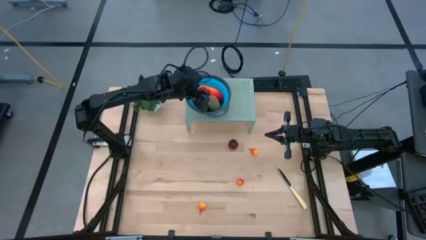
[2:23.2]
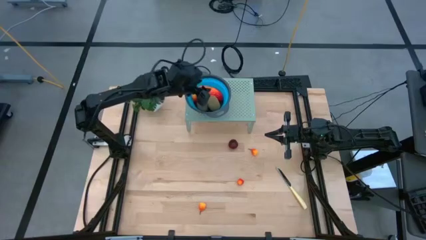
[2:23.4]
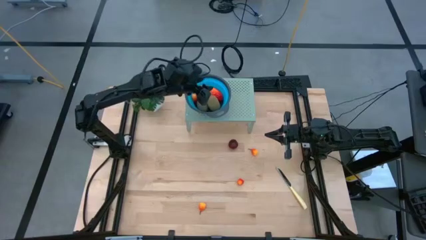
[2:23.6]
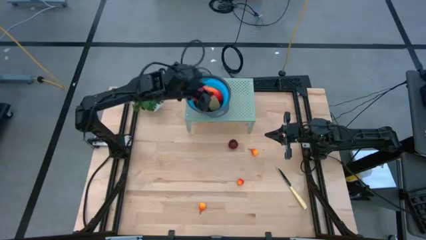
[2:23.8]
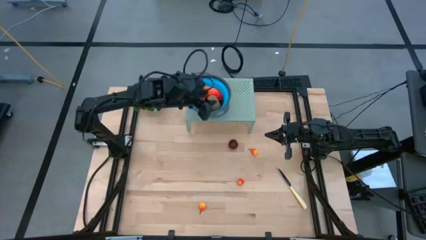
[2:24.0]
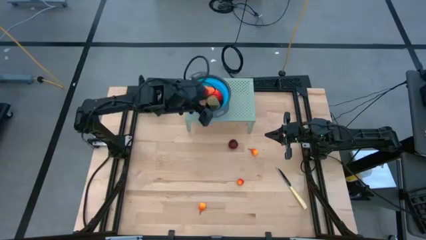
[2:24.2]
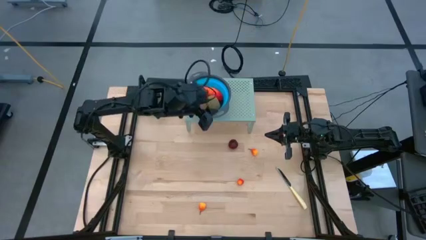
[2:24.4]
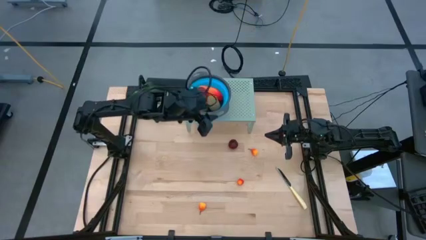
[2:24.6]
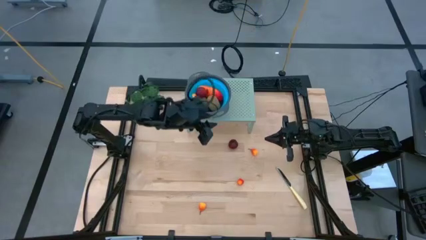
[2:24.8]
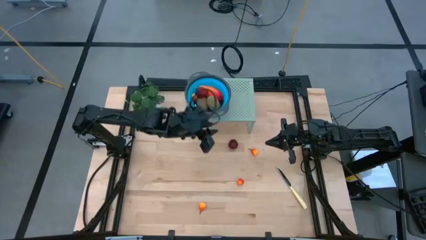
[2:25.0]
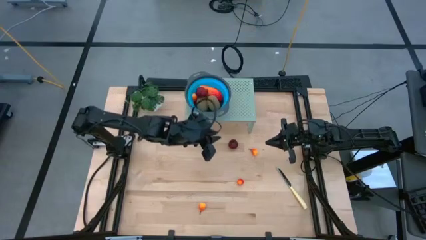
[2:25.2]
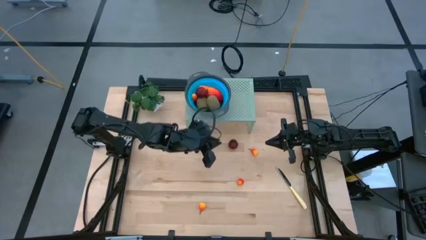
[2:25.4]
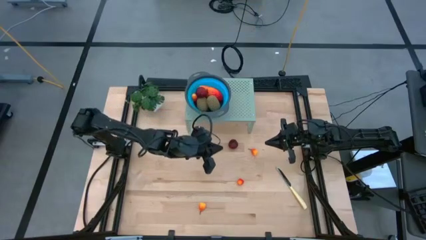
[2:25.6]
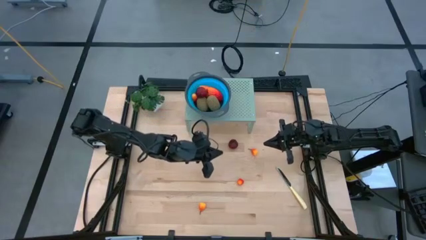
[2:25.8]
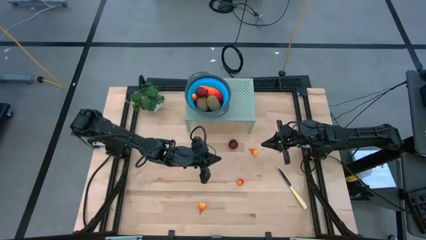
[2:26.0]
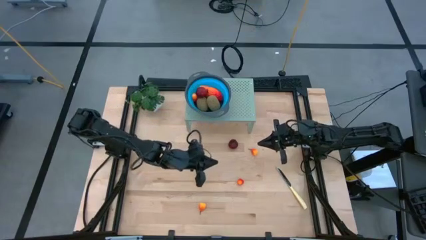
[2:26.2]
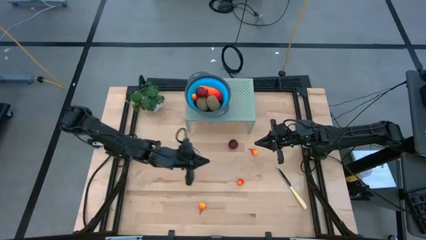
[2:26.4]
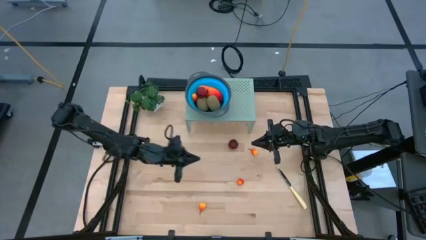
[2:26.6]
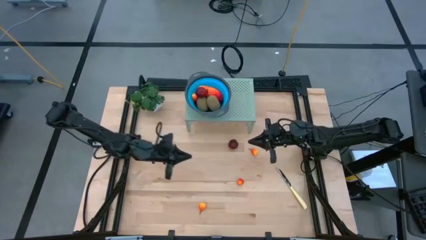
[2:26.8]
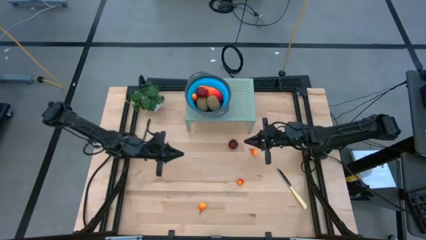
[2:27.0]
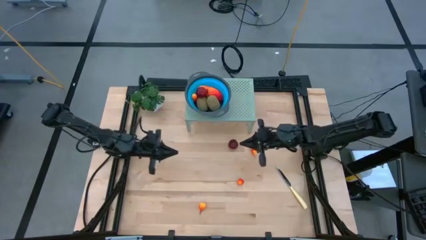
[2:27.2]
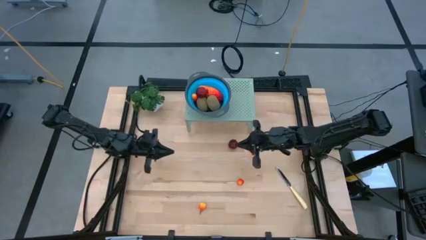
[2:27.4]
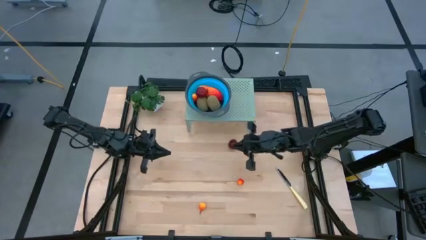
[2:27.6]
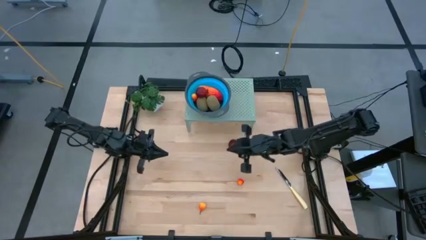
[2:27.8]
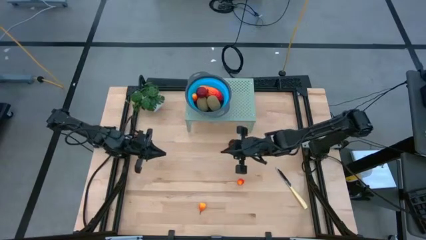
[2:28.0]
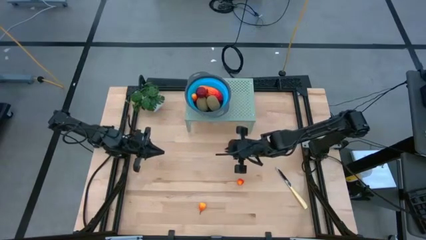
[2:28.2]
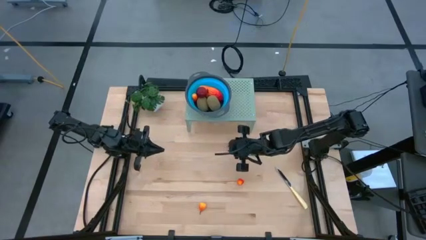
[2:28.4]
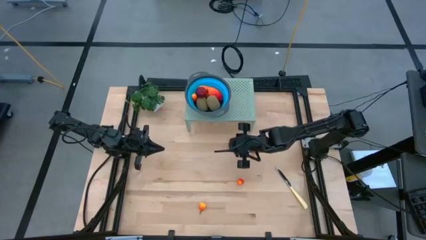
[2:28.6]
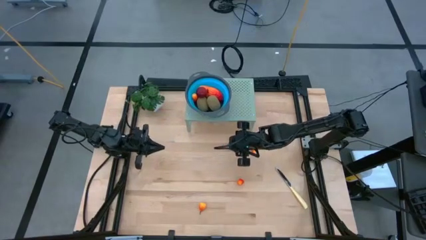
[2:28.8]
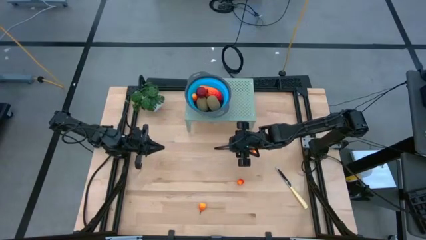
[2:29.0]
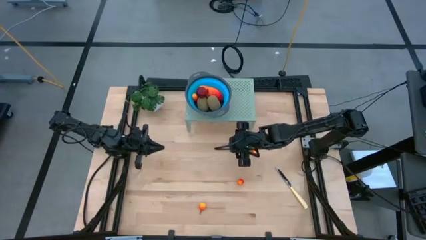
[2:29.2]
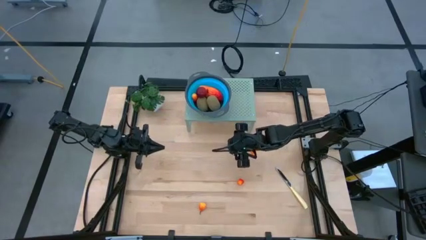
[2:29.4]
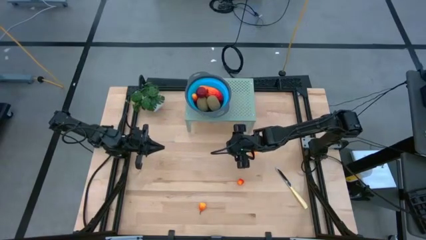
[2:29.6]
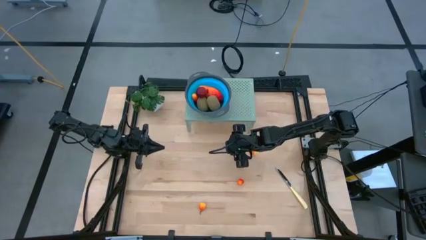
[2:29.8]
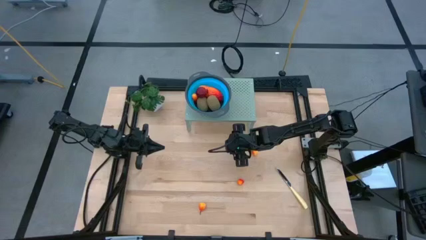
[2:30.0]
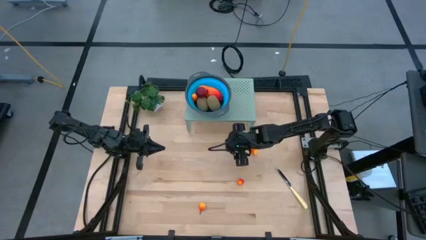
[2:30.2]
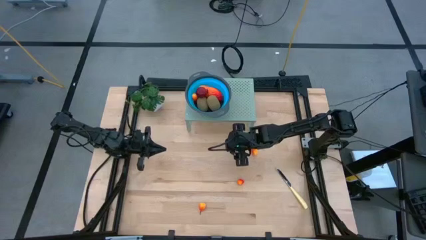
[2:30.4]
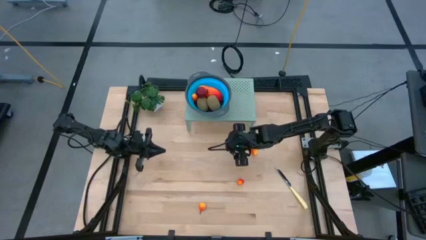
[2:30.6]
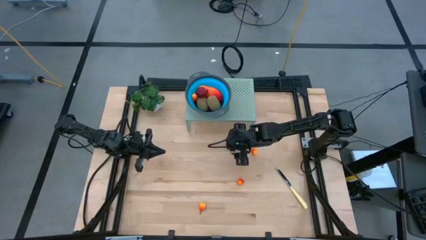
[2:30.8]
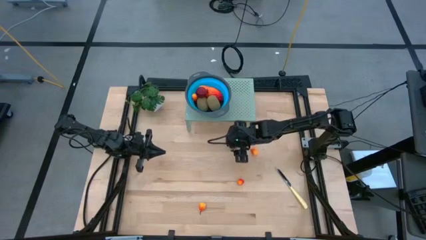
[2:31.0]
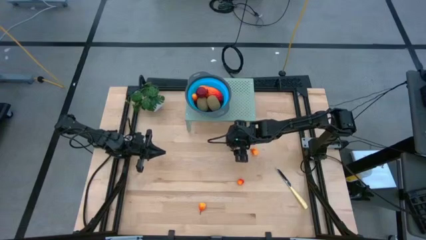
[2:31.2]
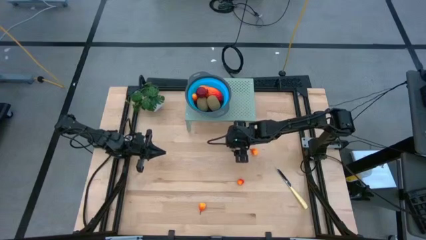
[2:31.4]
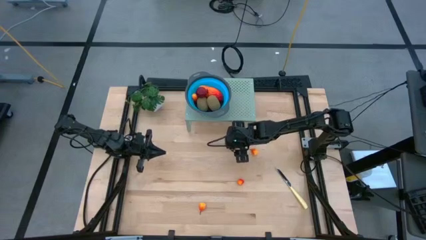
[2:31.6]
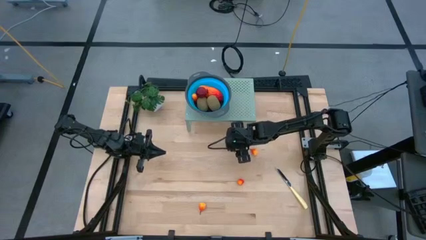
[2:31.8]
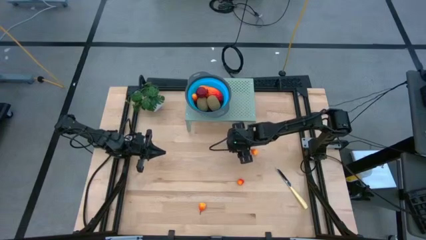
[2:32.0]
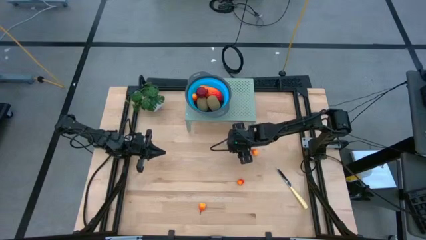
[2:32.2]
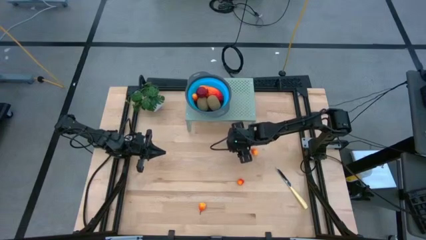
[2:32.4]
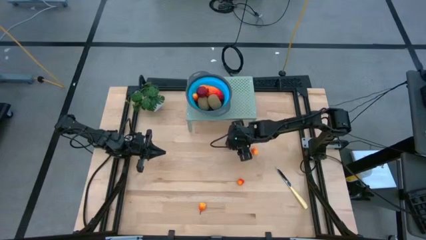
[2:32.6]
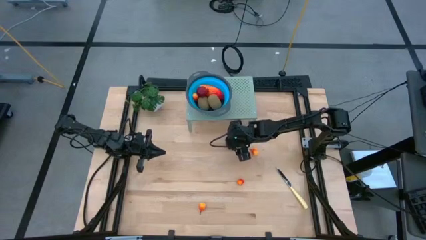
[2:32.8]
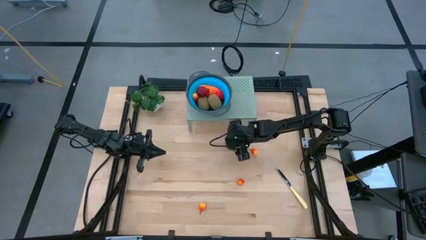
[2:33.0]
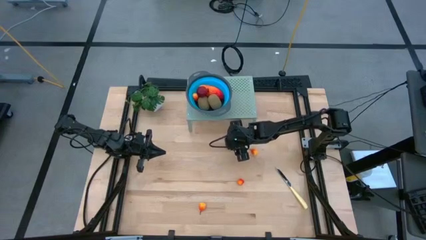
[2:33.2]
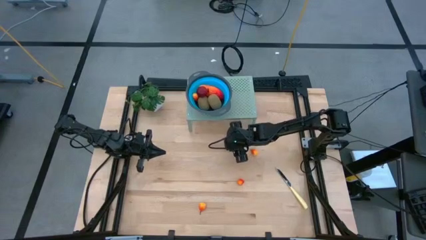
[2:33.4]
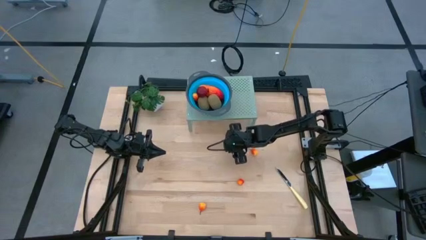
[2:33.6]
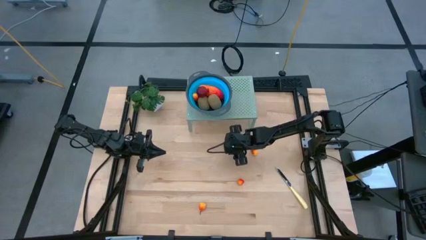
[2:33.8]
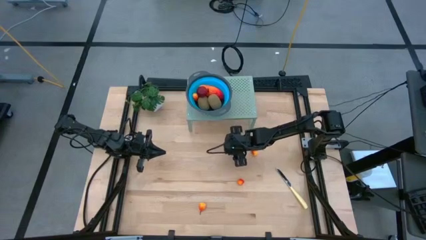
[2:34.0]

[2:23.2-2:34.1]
Task: Pick & Place Fruit
Put the red pomegranate into the blue bowl on the shelf

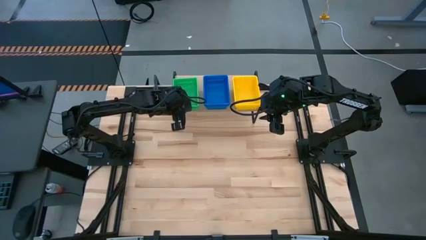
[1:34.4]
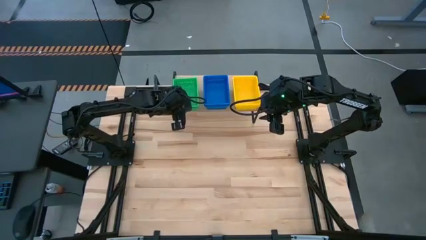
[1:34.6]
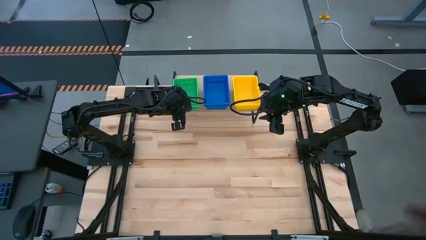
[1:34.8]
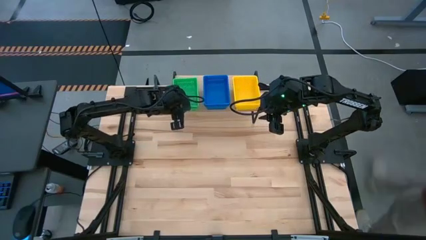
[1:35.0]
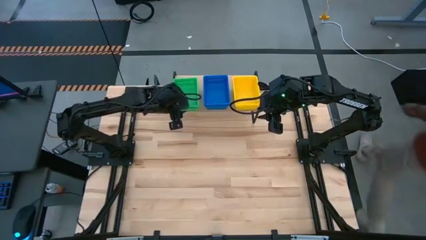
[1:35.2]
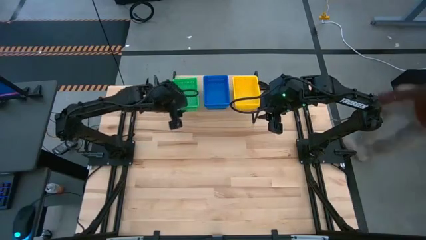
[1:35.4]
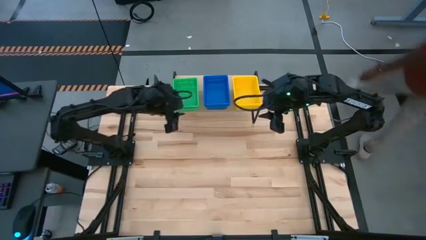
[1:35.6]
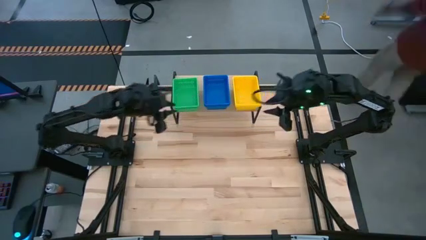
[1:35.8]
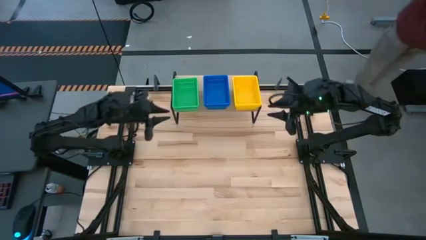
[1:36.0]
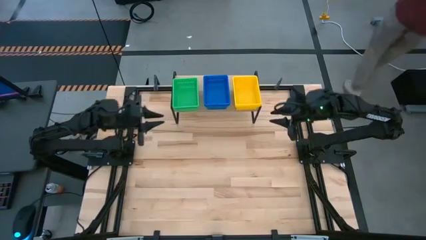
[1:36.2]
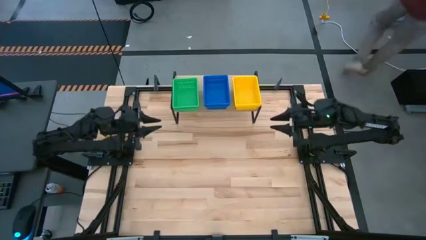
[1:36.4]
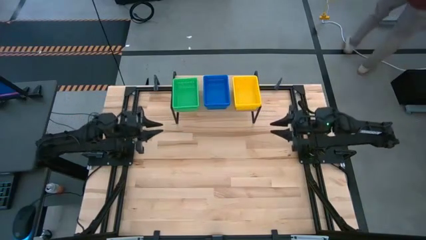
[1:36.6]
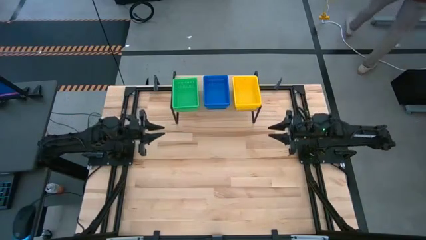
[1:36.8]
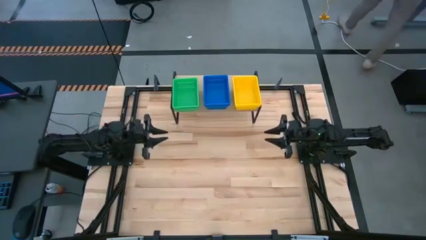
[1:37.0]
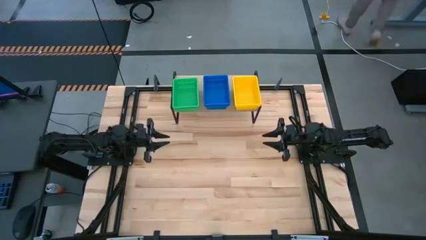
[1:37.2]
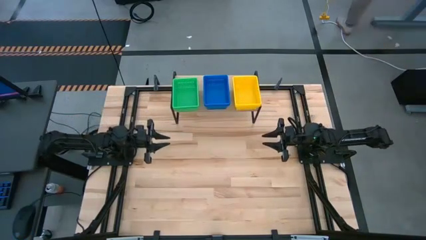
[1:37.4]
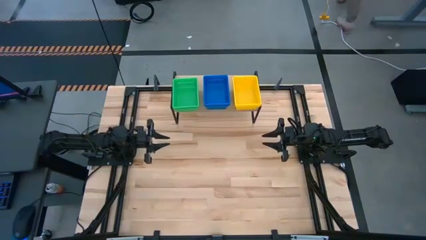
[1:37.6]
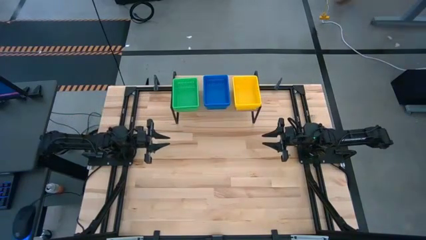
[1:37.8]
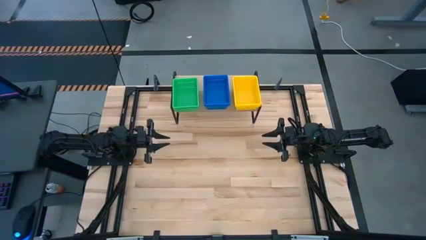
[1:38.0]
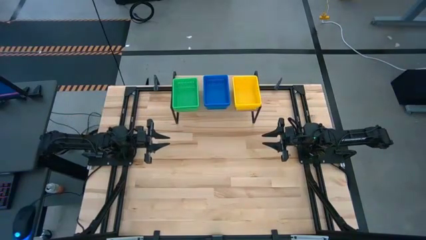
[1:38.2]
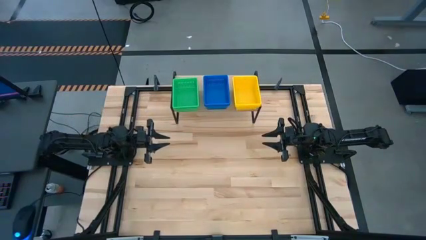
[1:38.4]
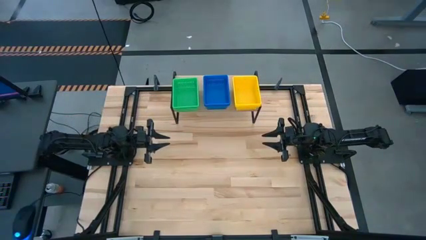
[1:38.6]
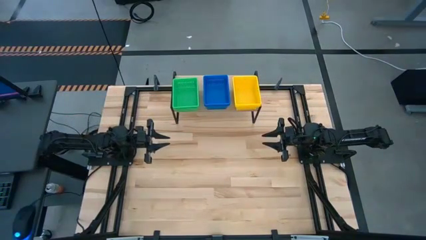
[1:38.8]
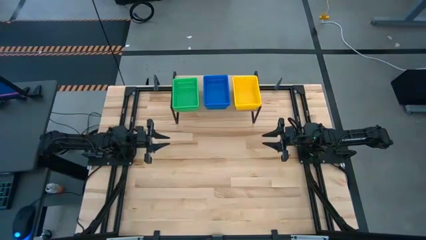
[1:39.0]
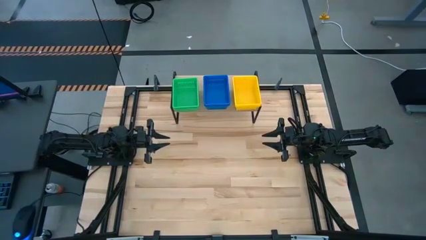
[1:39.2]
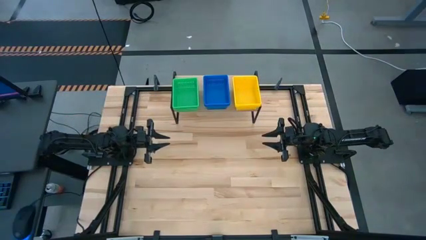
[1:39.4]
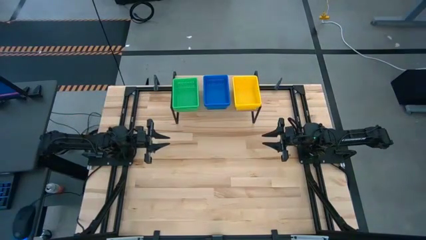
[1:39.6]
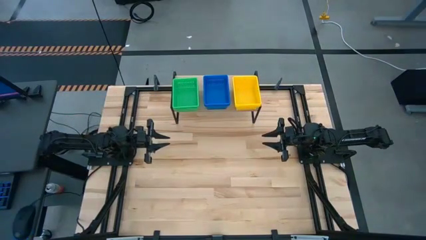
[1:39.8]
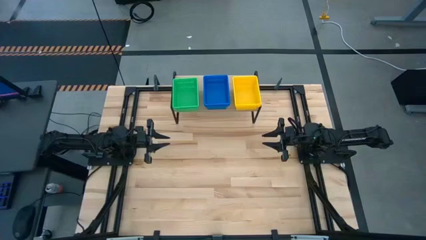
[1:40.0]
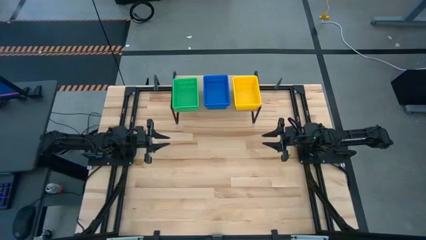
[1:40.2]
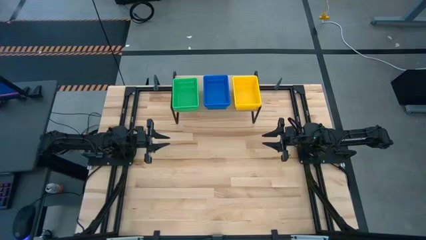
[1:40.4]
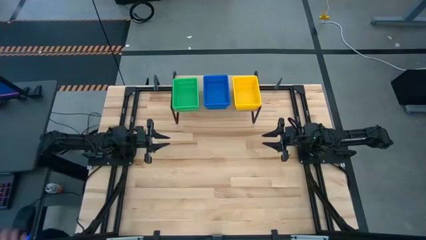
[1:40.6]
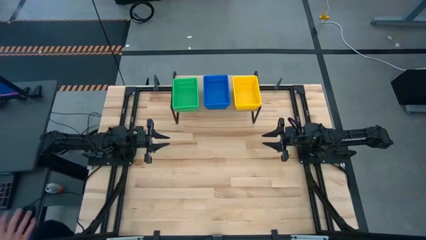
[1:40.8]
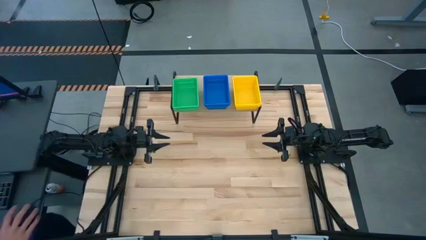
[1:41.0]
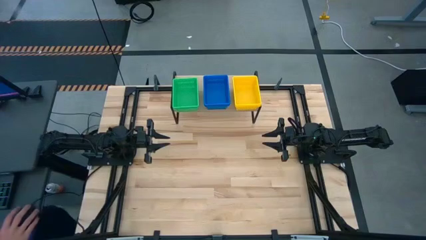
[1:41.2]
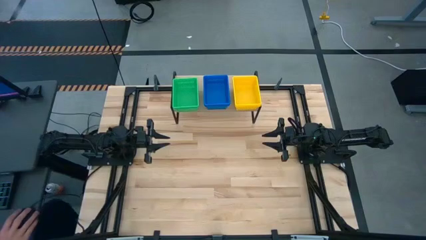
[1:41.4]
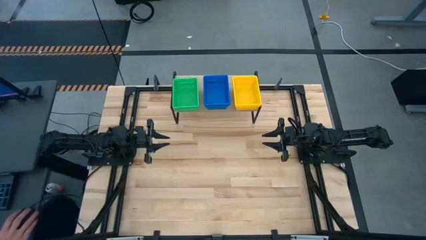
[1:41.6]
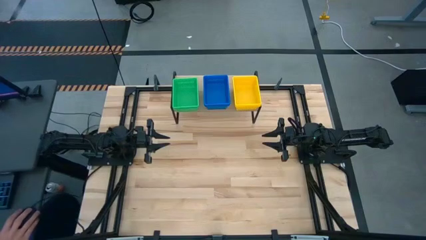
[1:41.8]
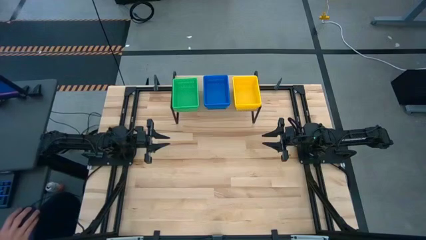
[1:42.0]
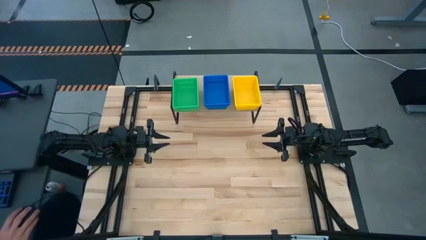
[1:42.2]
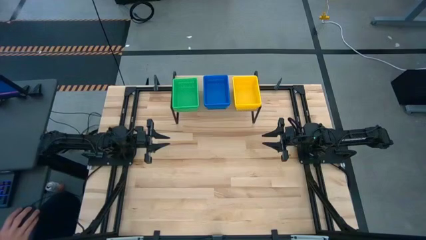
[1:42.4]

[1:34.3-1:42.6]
Task: Stack baskets on shelf by color
Return to Home Position
